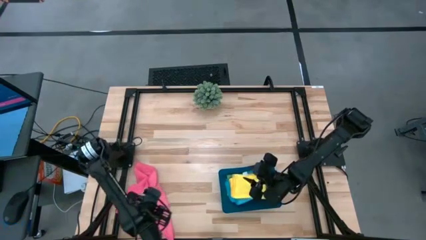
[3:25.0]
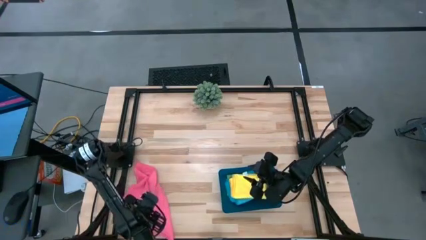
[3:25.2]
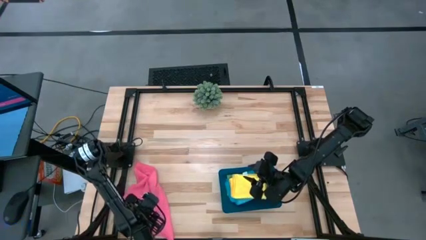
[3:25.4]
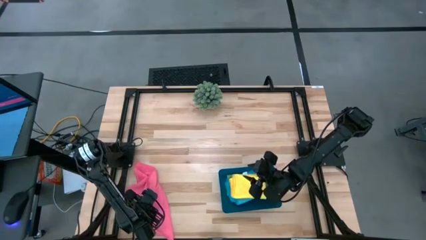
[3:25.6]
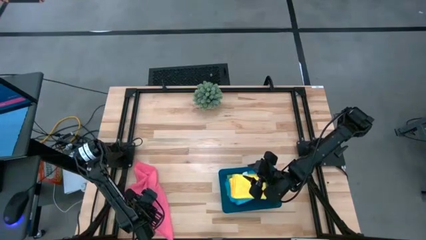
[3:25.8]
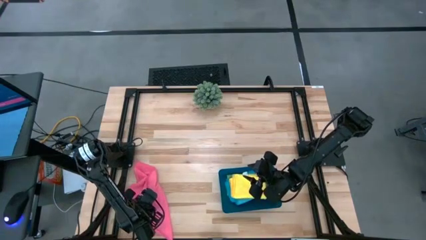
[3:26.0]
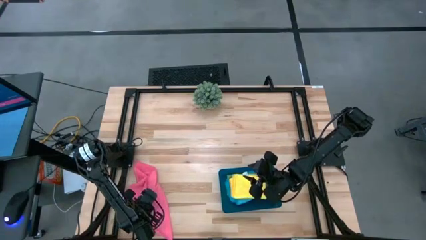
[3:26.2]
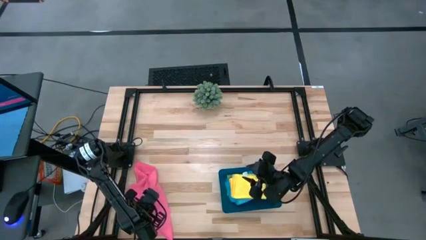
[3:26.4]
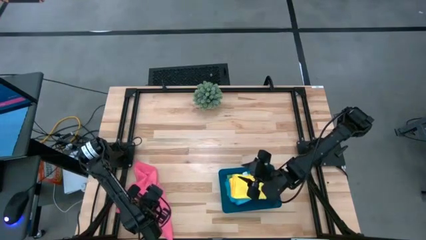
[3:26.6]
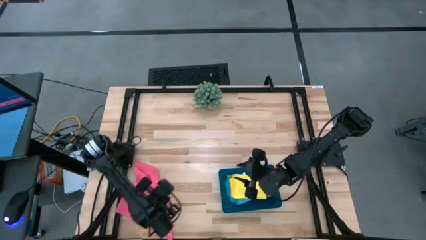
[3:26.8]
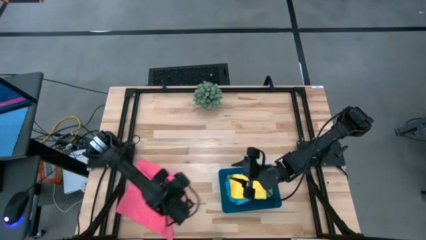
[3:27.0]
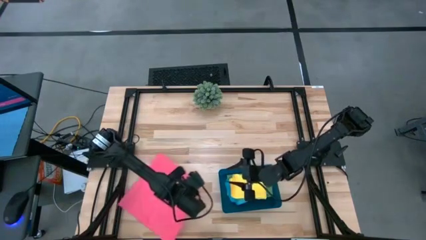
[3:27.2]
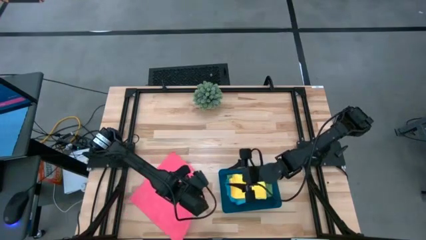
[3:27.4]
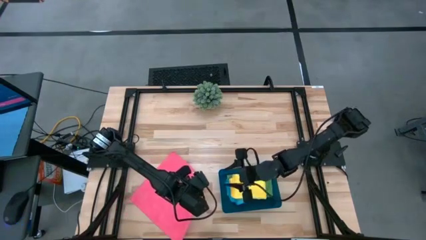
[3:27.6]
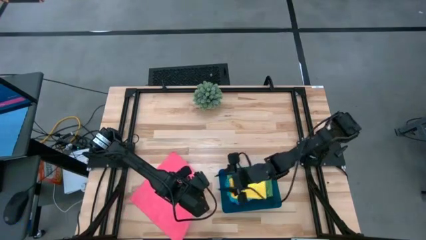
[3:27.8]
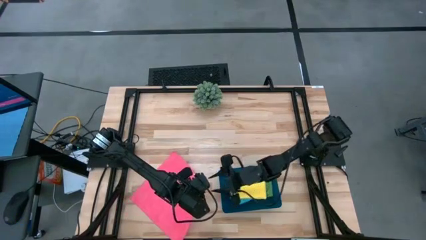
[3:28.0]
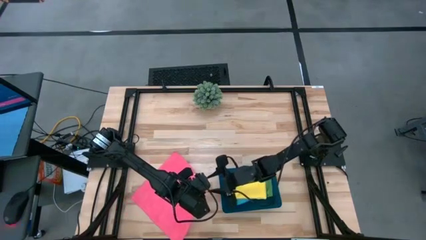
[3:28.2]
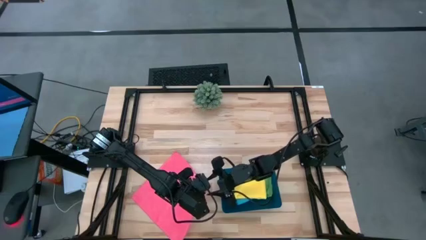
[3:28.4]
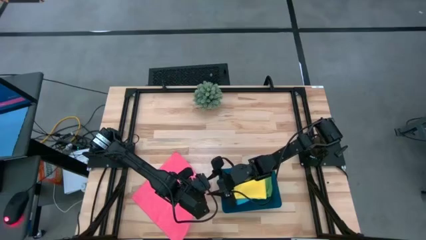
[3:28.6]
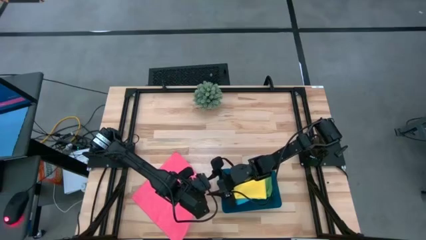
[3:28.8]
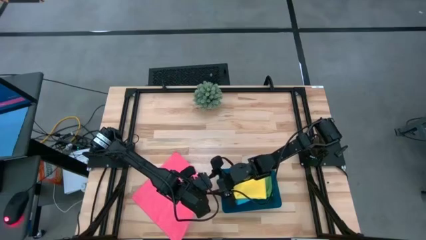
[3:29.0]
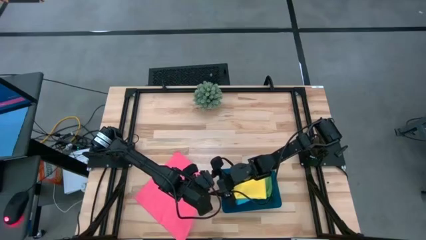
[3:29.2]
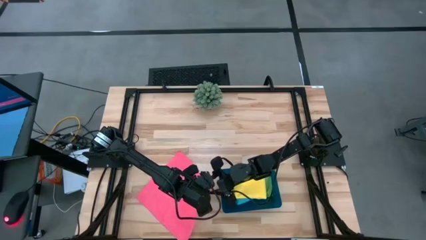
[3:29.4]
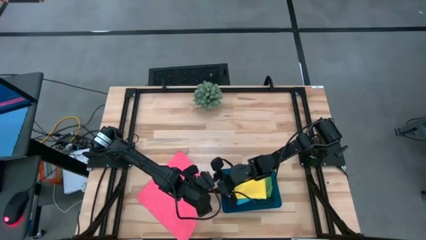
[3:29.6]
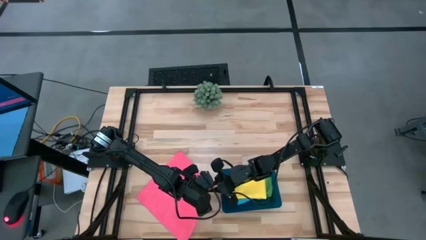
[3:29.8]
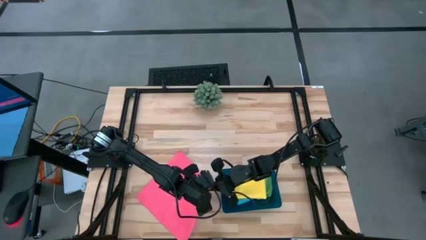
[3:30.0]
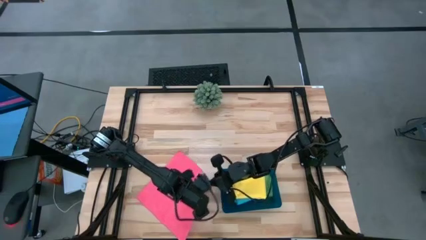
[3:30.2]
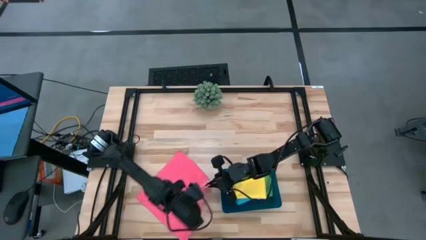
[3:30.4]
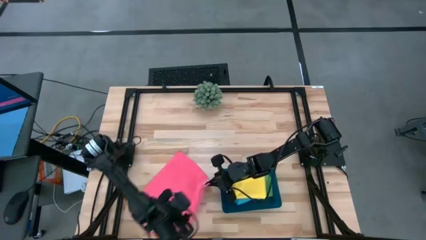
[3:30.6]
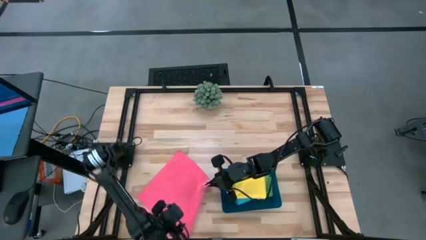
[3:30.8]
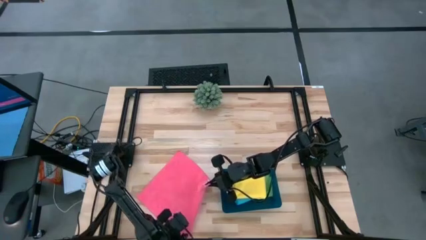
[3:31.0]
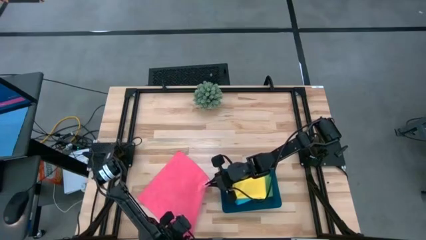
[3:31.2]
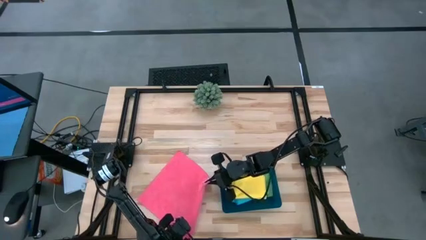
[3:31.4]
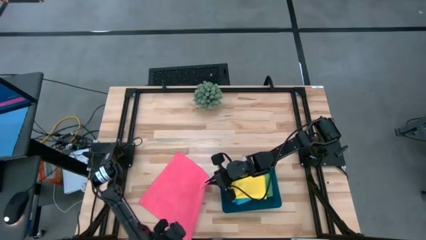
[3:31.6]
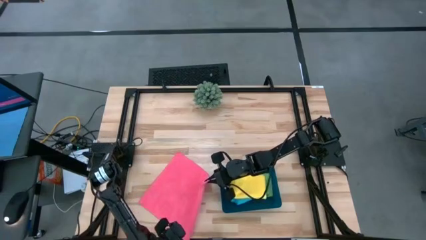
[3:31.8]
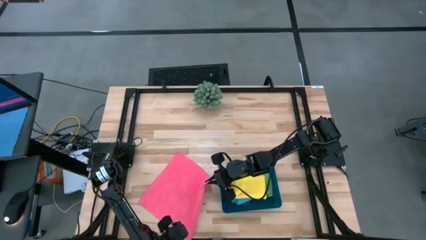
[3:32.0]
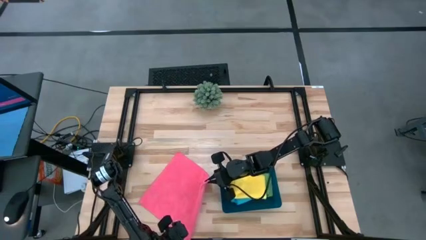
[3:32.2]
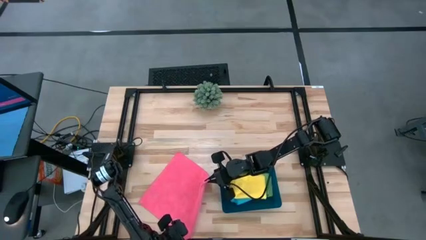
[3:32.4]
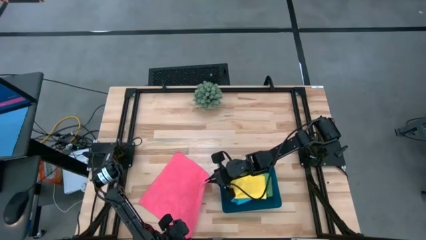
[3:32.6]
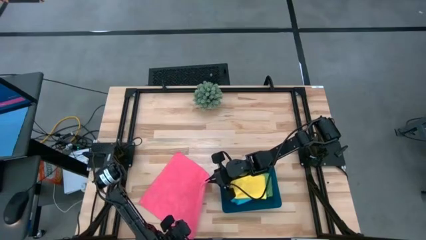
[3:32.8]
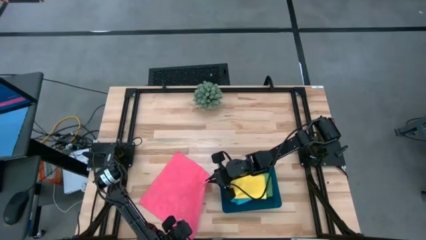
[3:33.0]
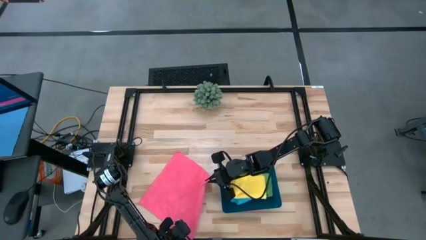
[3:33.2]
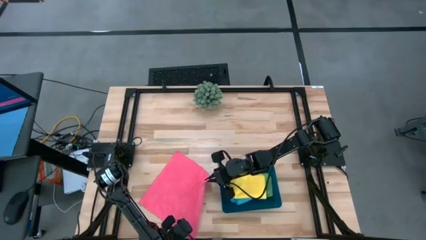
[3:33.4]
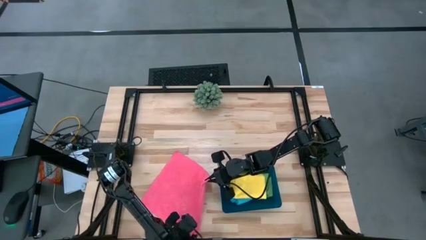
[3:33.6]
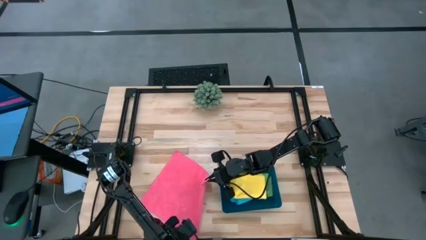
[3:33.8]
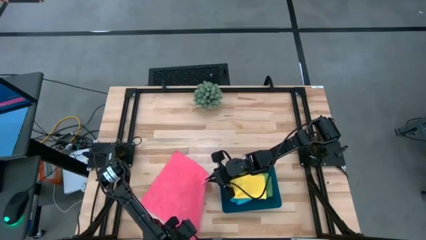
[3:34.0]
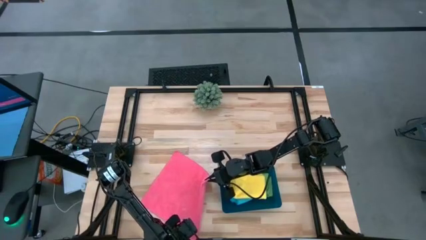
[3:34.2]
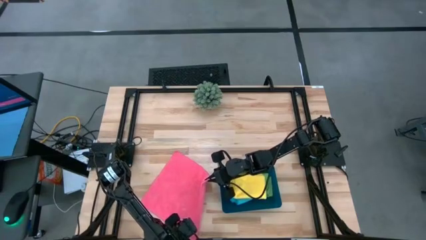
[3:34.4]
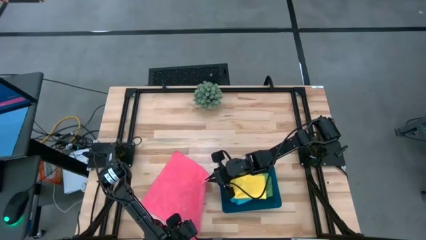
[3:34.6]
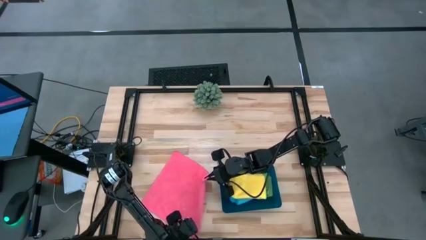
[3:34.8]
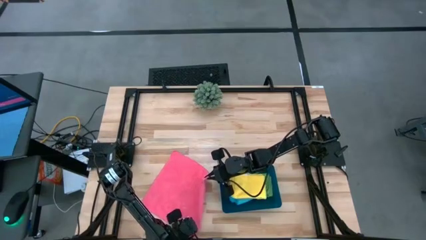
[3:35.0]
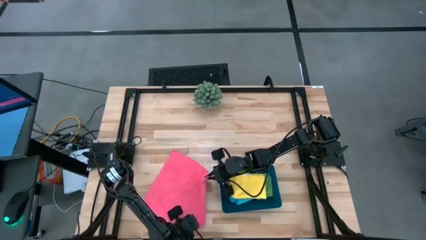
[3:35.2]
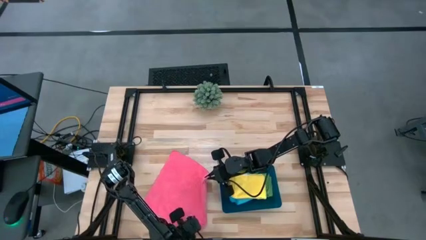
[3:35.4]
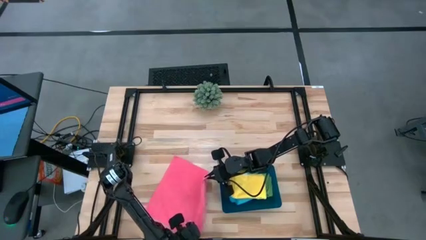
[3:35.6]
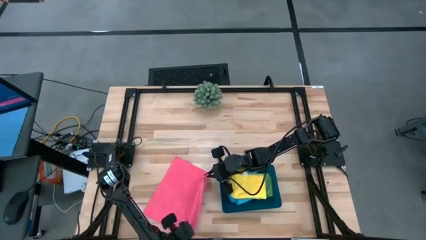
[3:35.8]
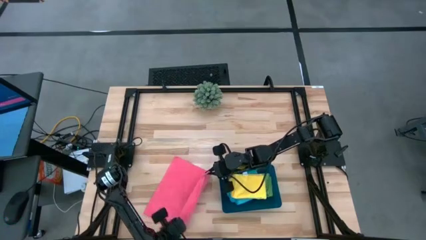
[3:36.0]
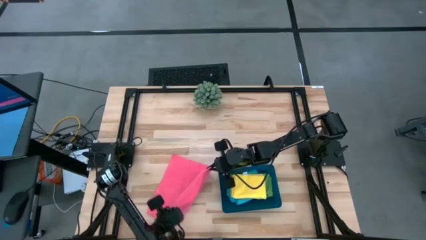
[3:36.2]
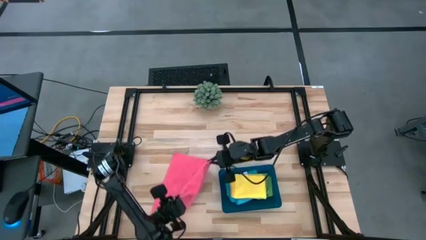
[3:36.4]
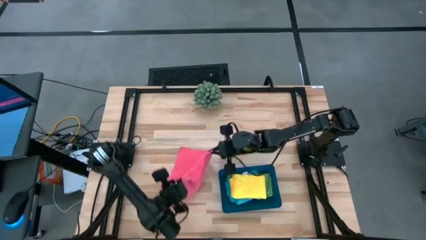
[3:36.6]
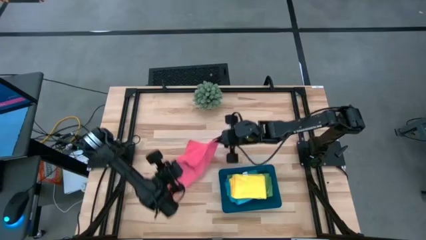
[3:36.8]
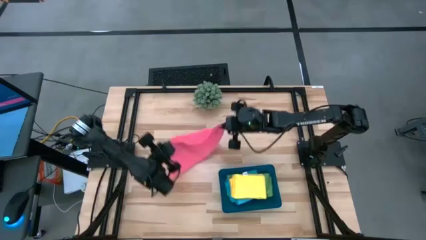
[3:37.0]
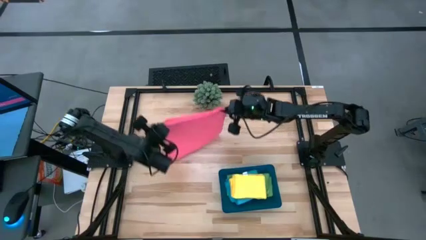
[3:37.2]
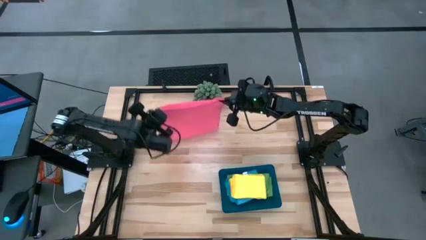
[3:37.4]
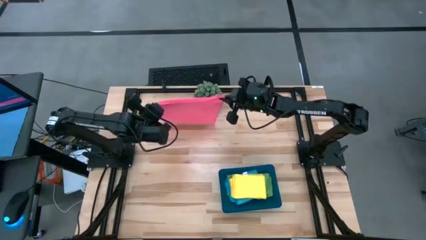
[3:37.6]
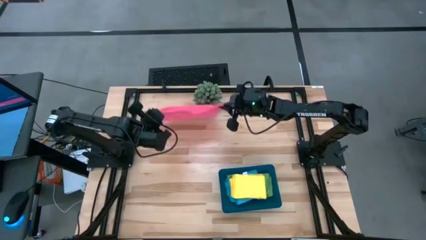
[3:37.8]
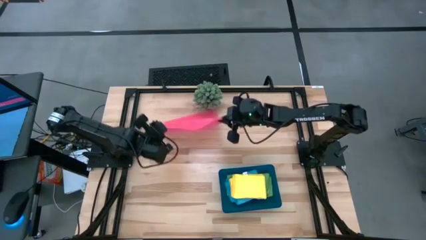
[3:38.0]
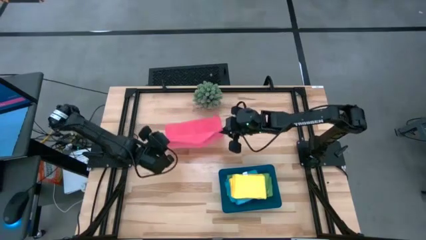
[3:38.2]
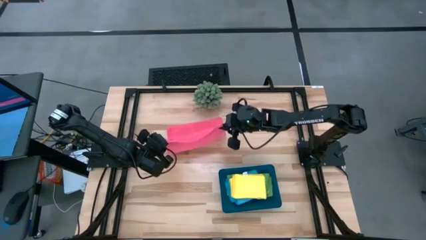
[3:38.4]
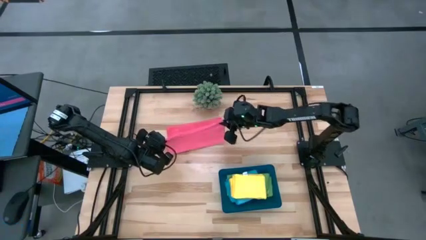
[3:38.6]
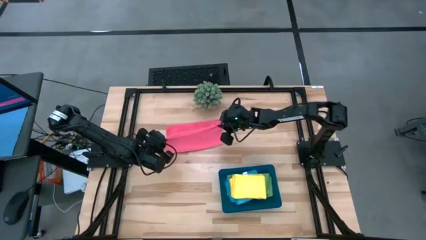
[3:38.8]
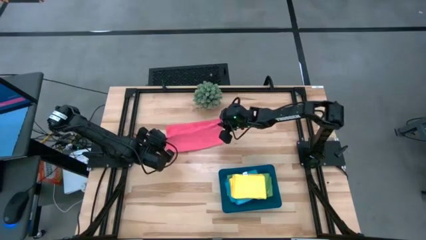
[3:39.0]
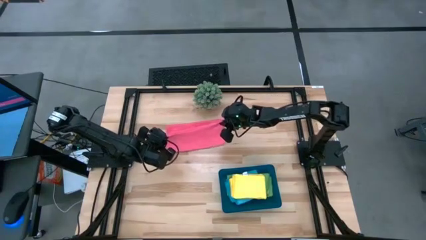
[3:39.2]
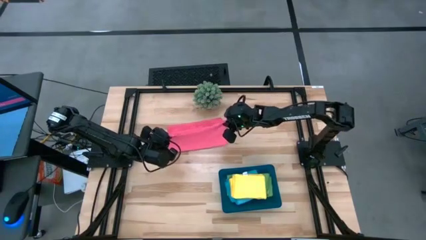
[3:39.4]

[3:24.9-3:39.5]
Task: Fold microfiber towels
Fold the pink microfiber towel

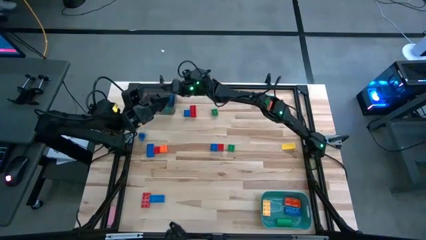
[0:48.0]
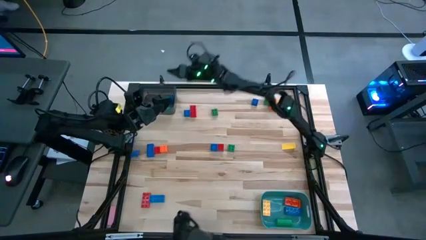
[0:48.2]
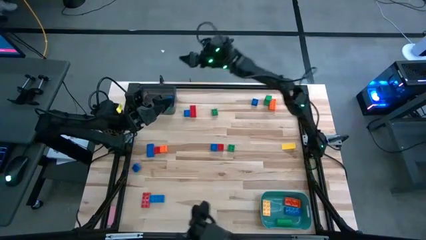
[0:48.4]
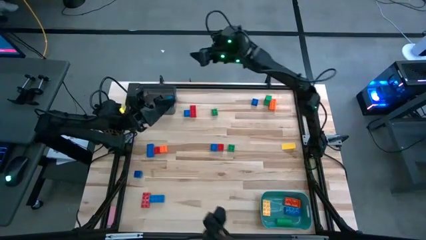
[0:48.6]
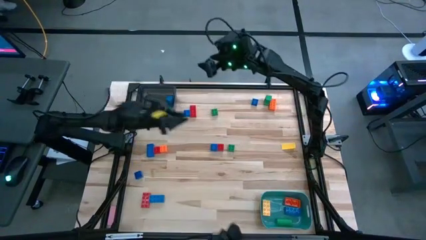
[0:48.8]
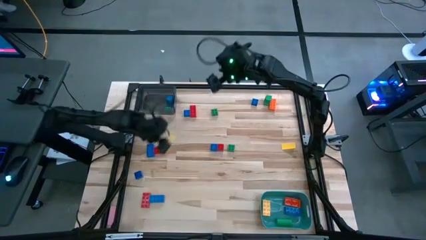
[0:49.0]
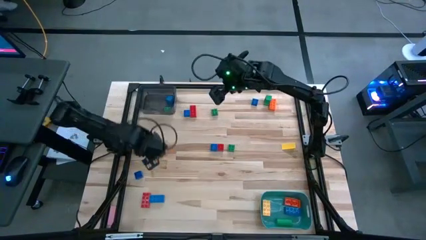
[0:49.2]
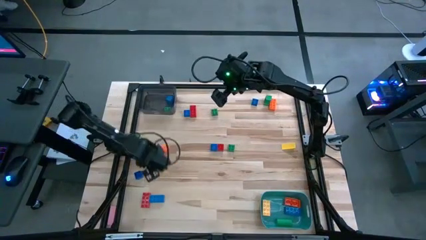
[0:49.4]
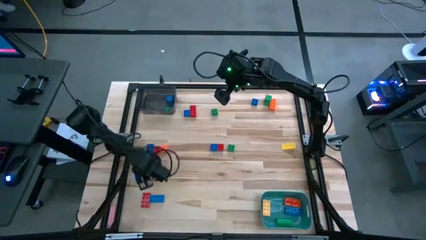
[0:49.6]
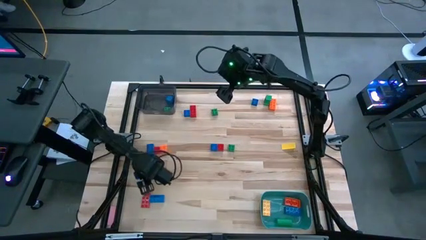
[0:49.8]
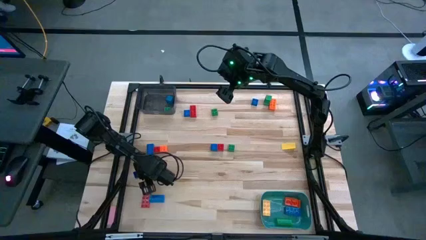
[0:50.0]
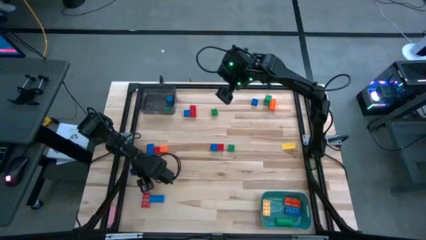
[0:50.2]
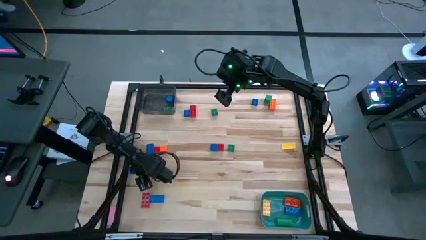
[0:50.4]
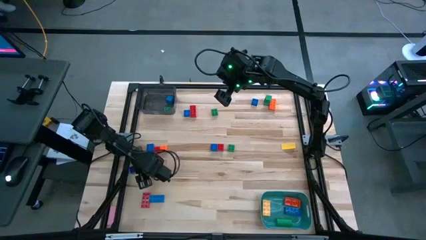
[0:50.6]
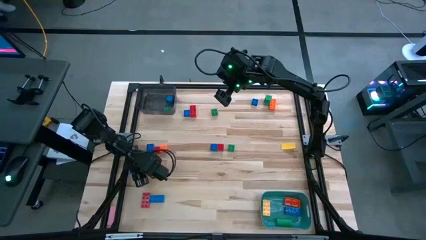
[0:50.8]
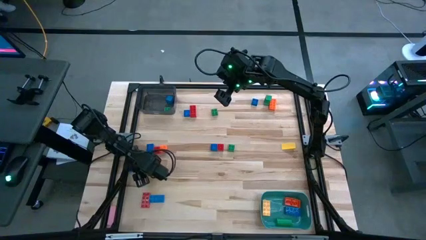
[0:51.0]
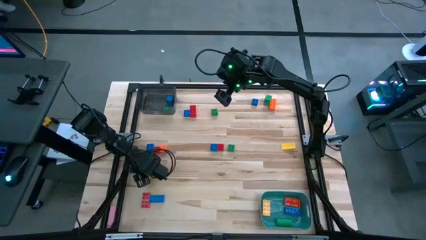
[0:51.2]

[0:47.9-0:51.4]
Task: Sort blocks by size
Put the bottom right blue game piece into the black bin
